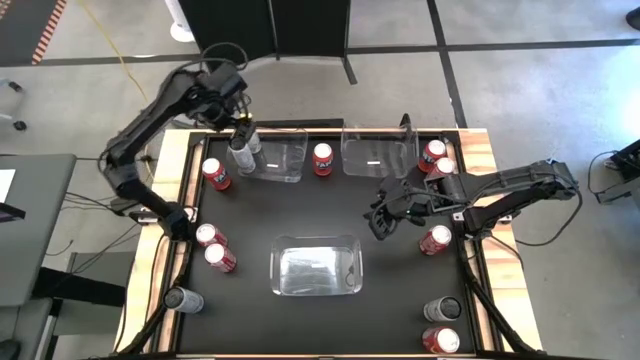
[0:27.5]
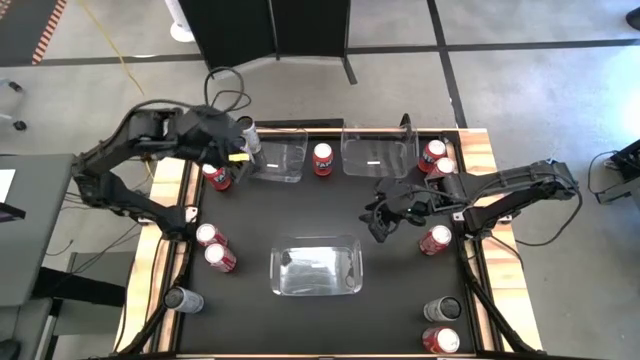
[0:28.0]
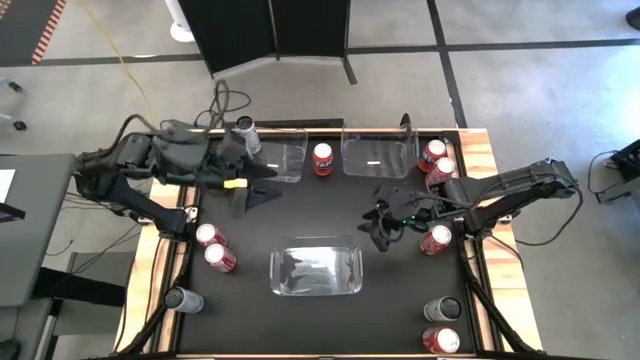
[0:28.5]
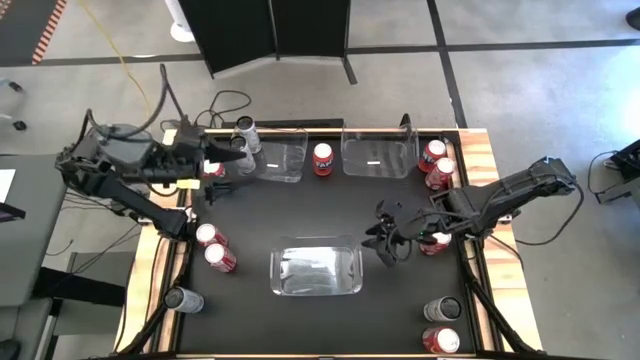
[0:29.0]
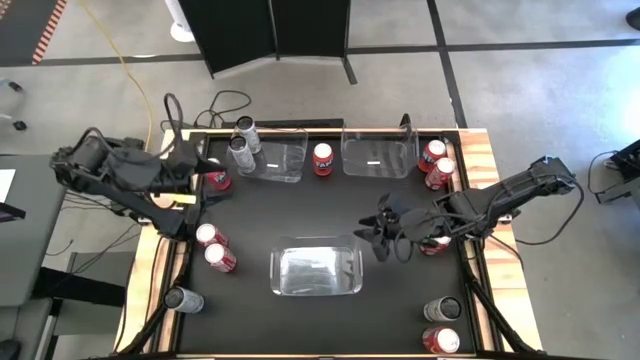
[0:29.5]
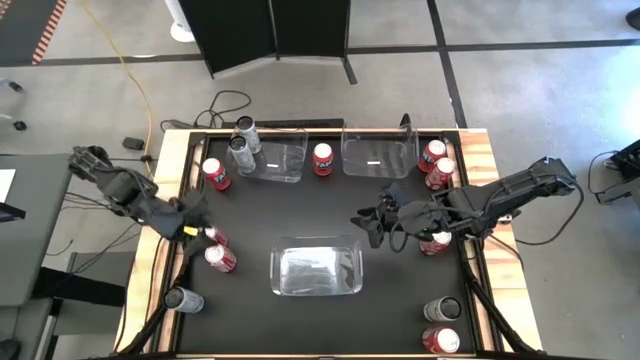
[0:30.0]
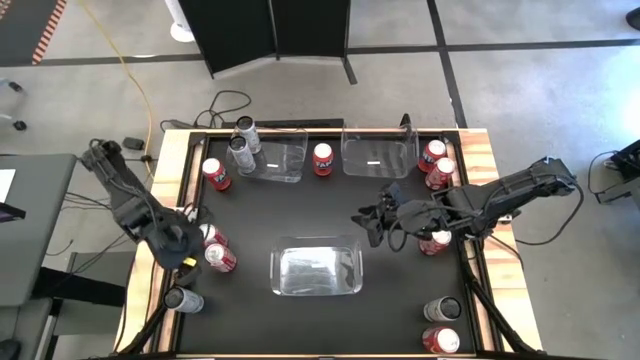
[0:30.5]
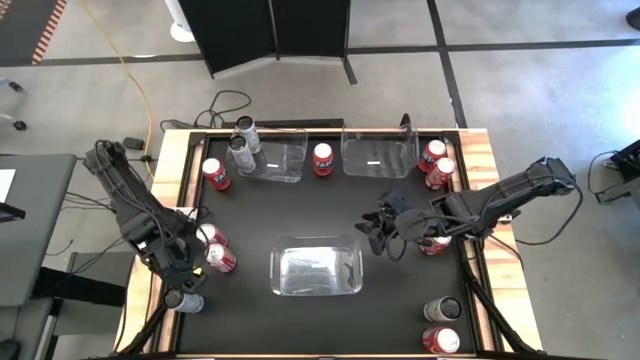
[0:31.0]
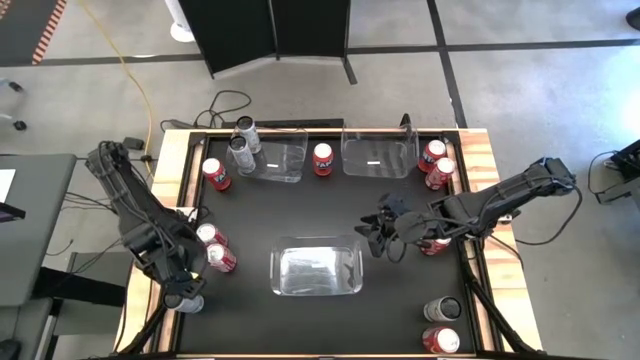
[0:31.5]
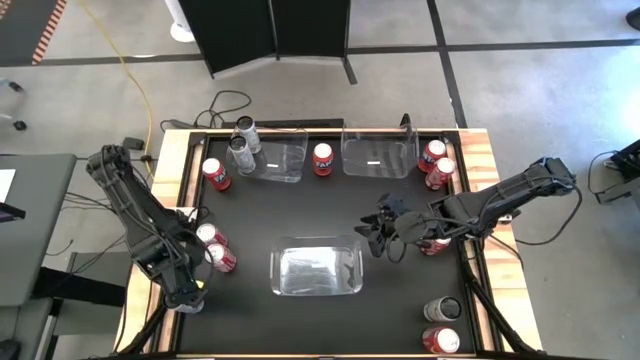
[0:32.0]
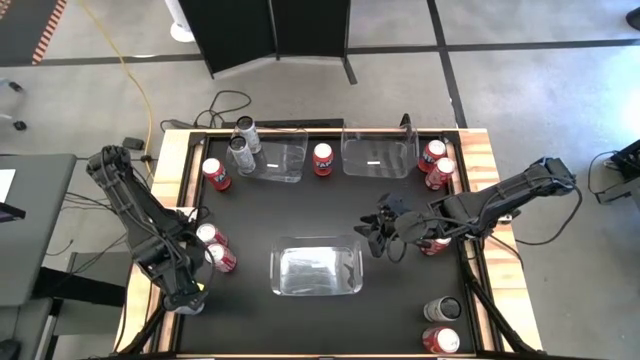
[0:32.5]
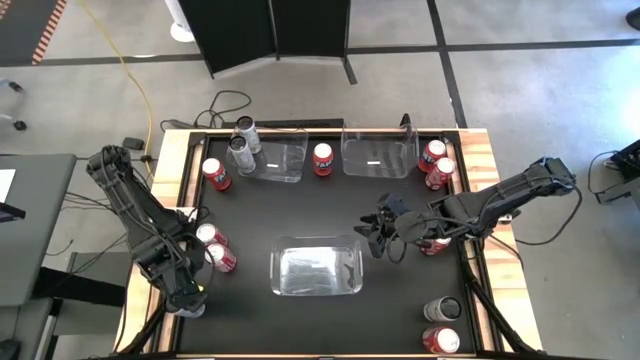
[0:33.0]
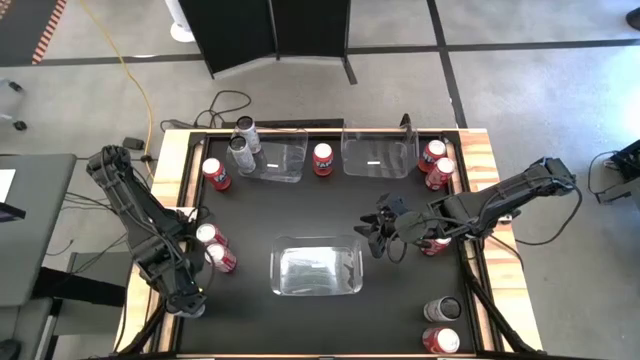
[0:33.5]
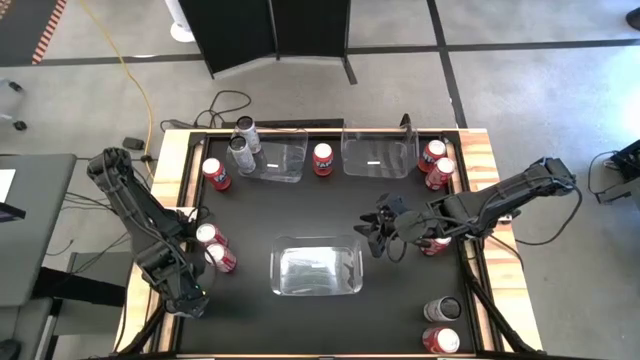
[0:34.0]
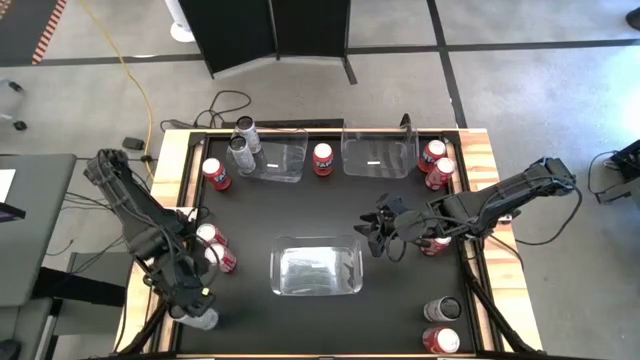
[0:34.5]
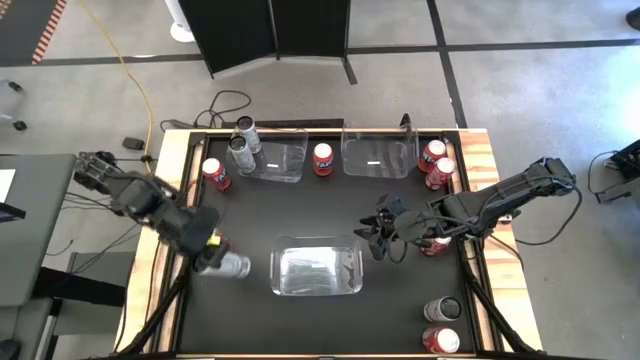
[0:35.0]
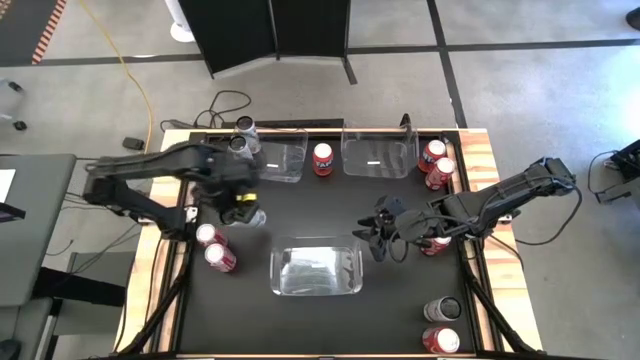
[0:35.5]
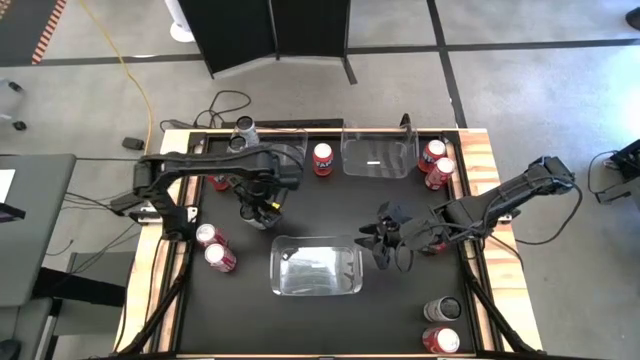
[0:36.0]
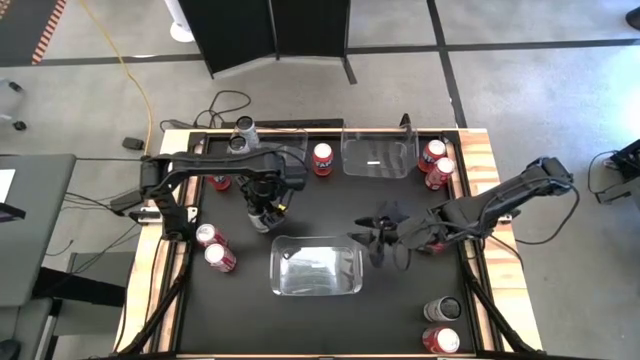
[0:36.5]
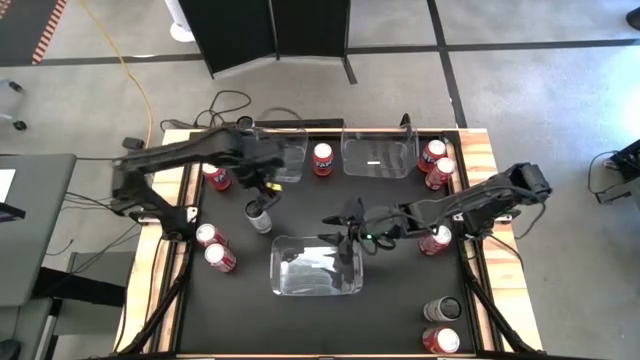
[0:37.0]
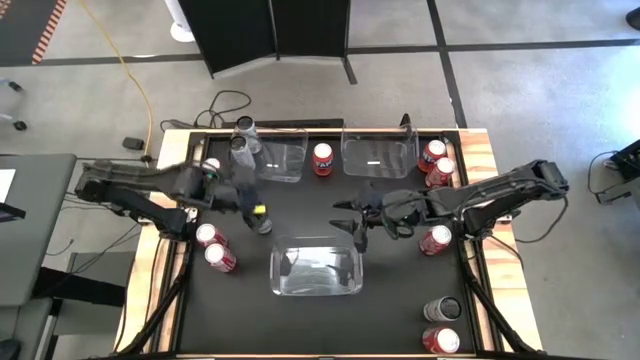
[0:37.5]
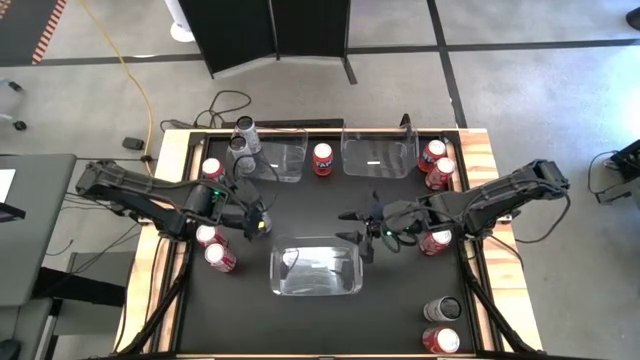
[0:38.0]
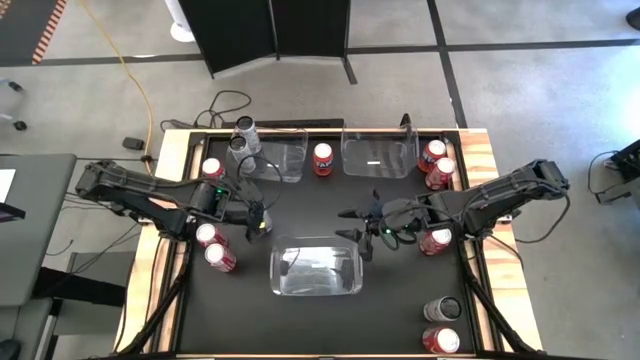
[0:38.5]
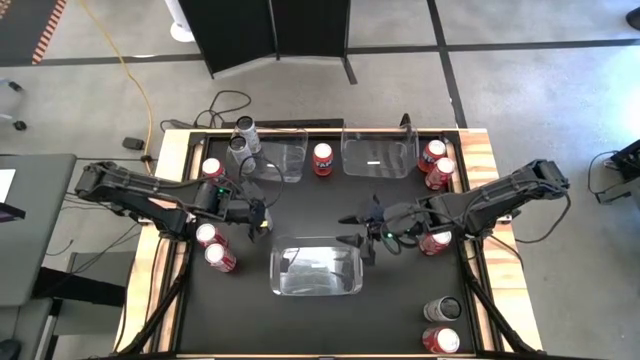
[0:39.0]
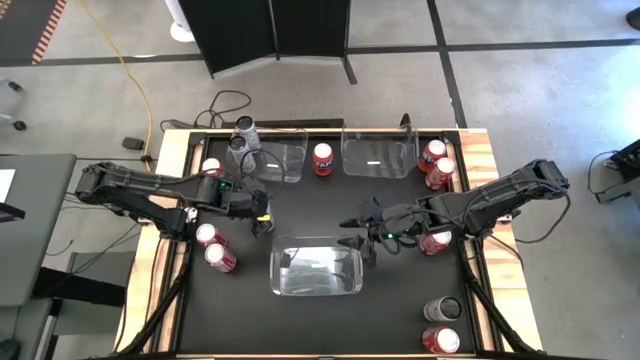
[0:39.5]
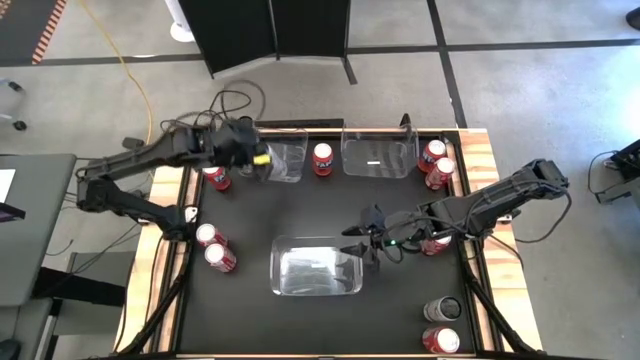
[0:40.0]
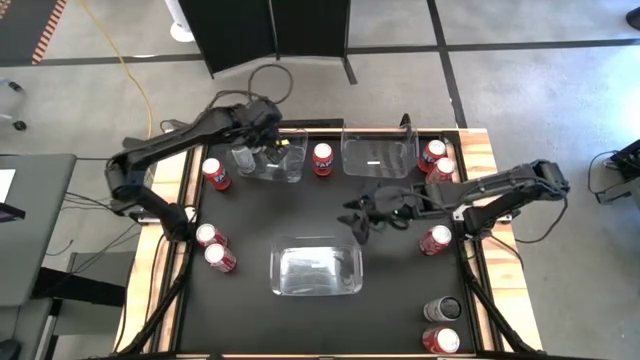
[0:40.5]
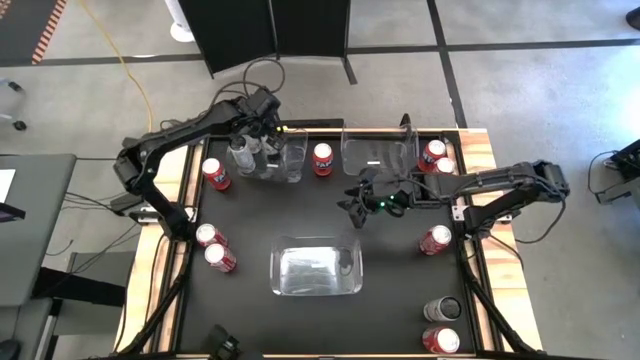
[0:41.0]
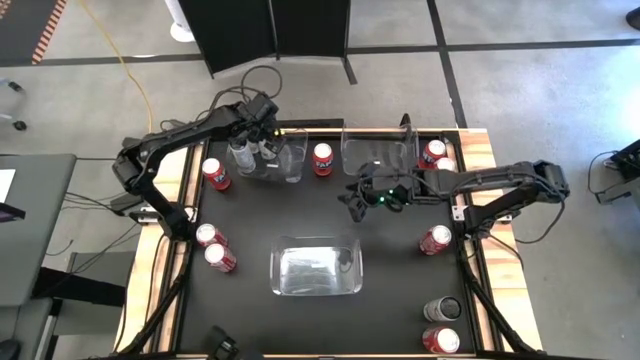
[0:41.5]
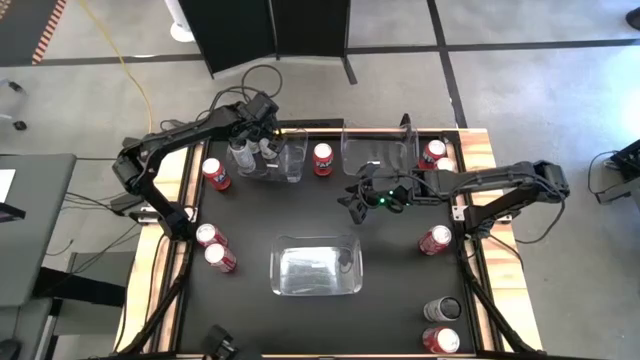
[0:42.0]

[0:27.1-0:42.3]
Task: Sort soda cans
Put the left white-yellow soda can into the top left transparent bin

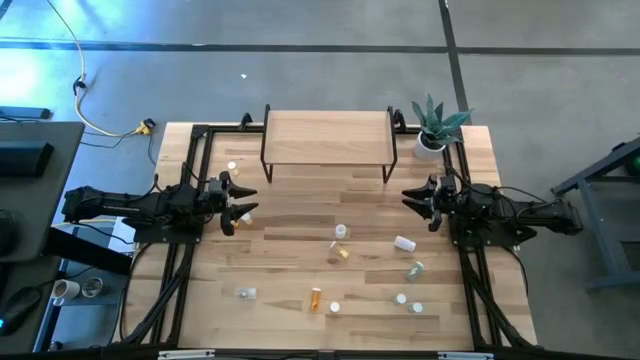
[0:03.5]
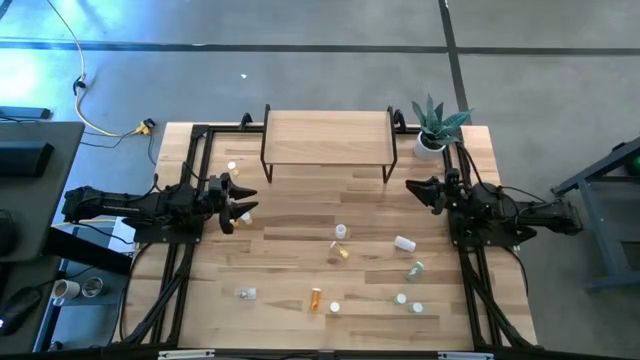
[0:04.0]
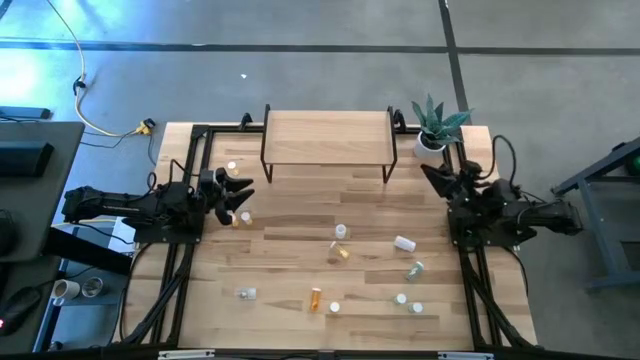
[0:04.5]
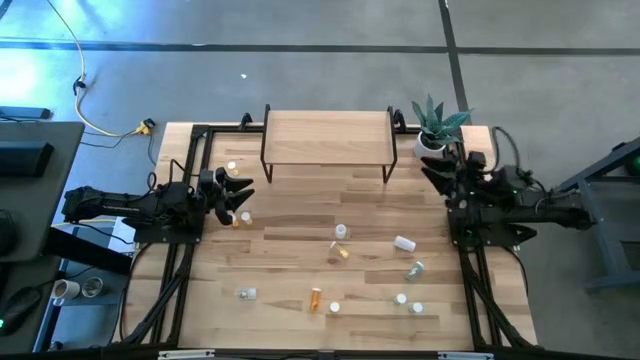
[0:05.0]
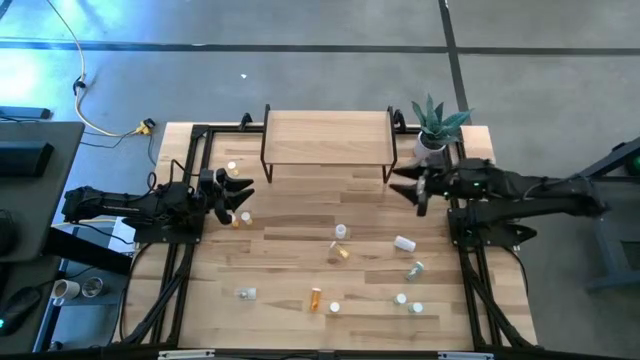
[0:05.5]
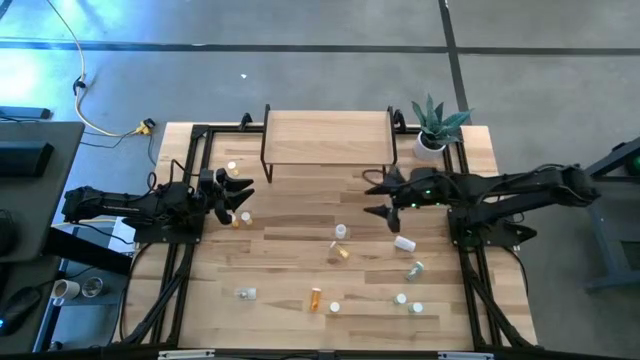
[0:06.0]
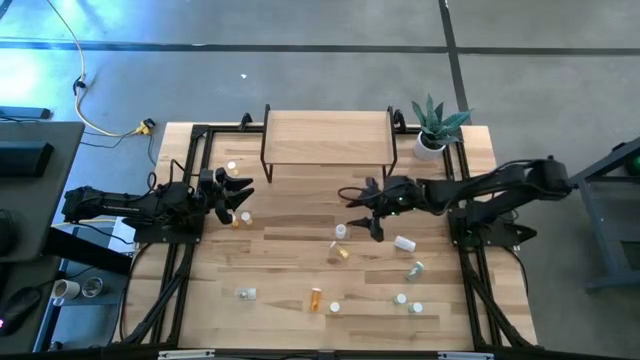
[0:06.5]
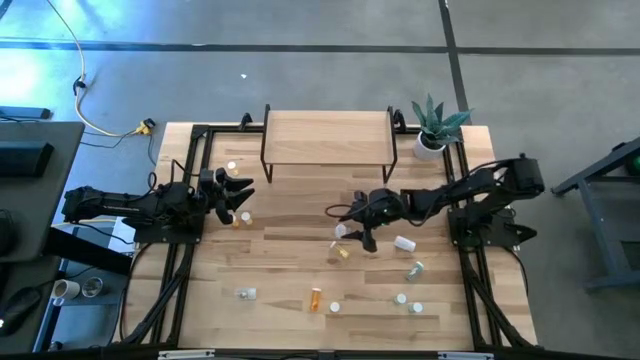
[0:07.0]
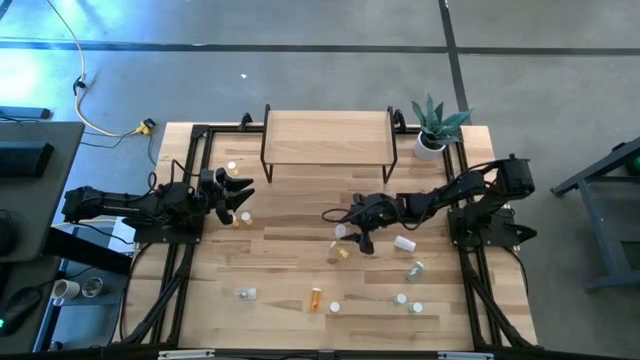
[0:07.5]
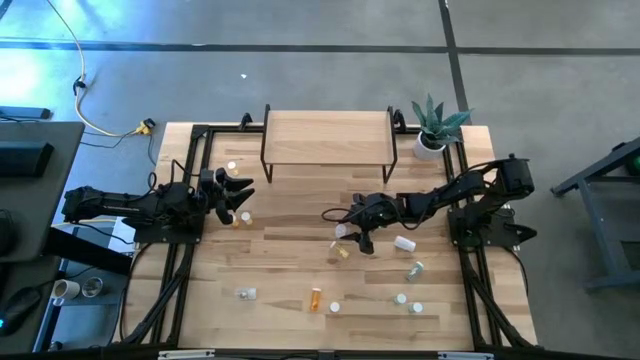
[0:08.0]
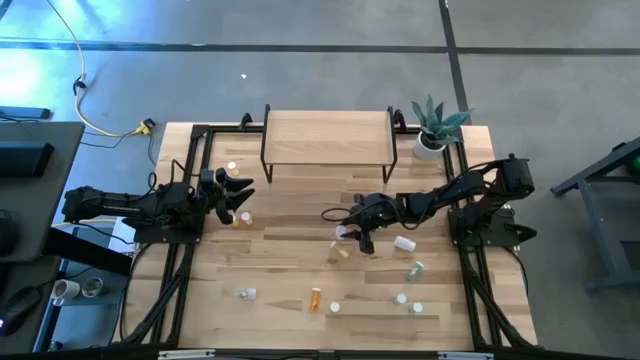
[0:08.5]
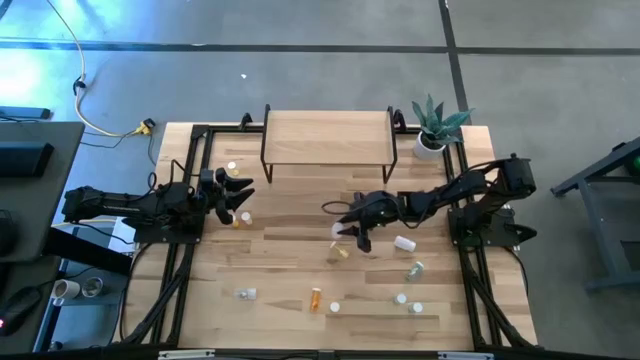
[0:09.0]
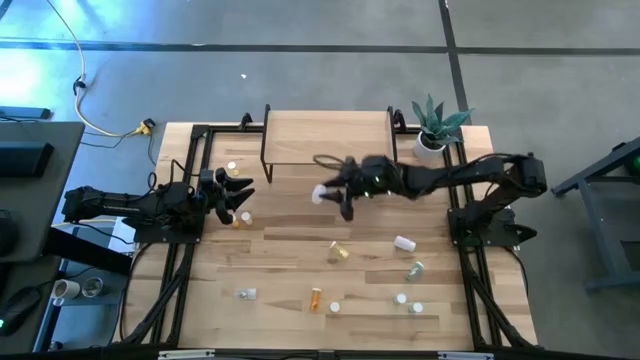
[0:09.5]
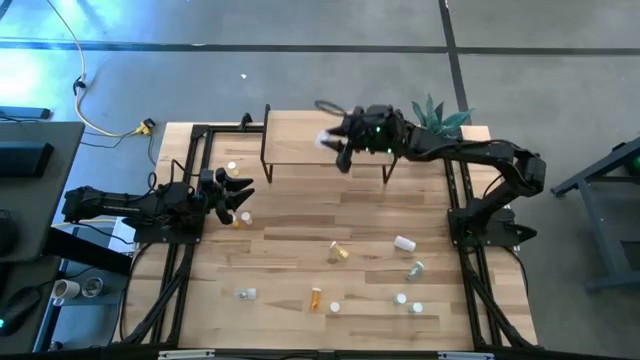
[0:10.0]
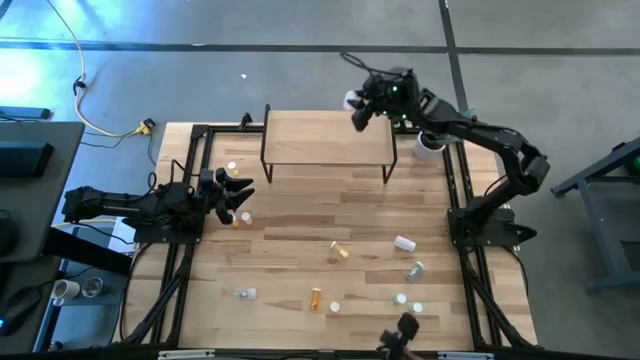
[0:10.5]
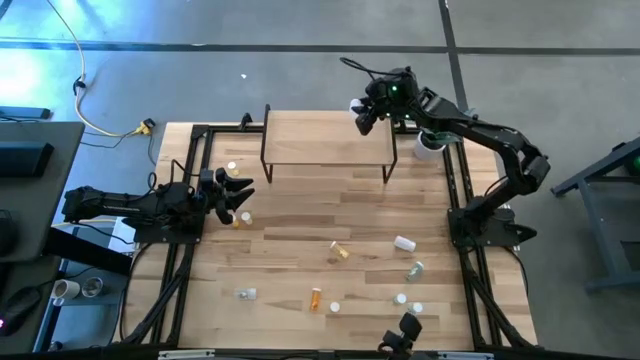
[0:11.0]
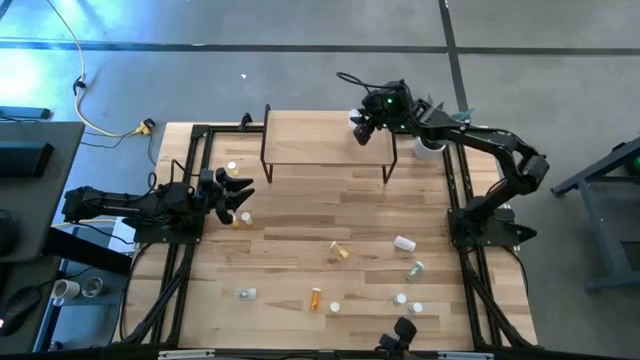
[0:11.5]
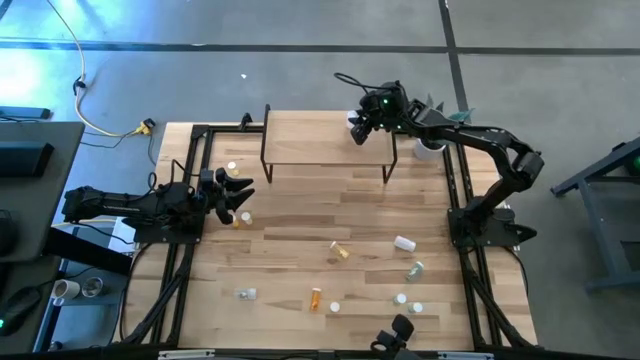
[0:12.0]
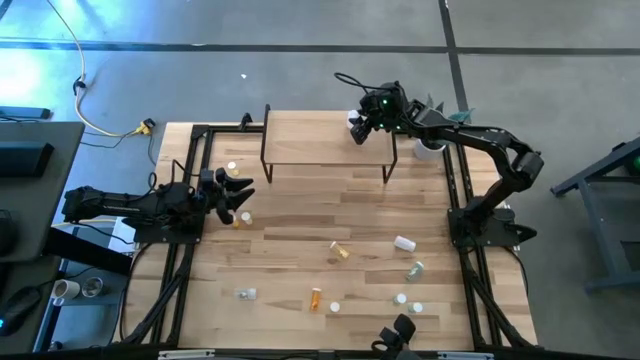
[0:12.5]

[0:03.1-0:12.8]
Task: Pick and place medicine bottles onto shelf by color
Put the center white pill bottle on the shelf
